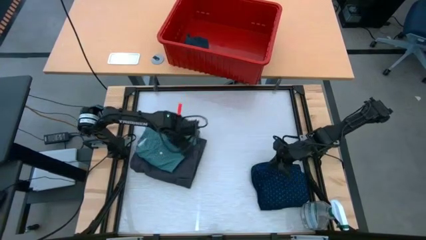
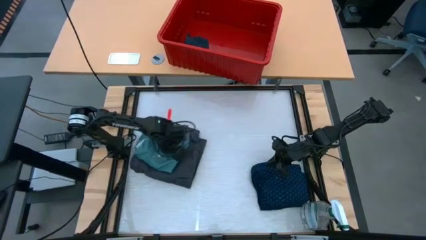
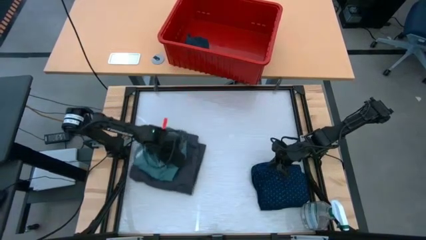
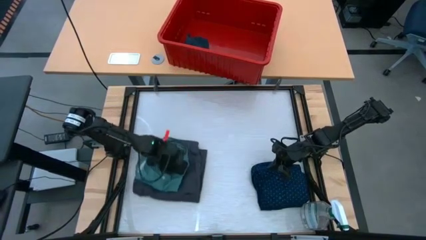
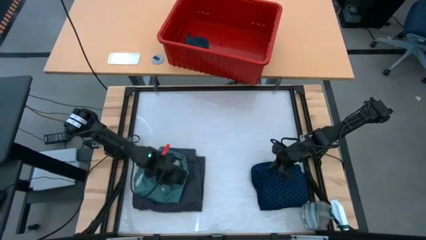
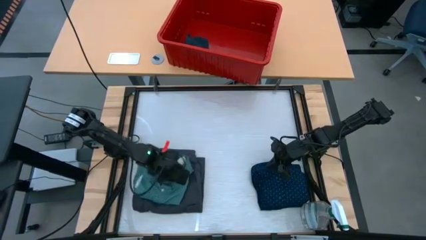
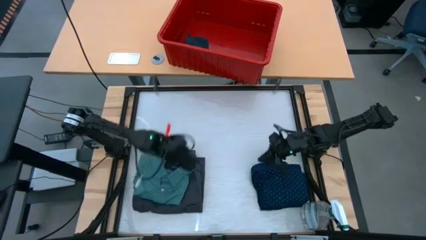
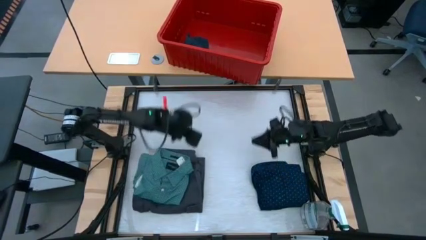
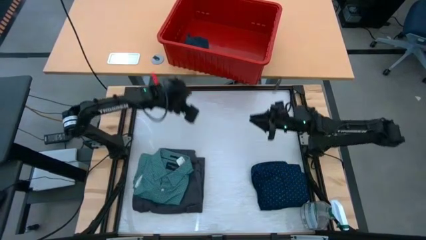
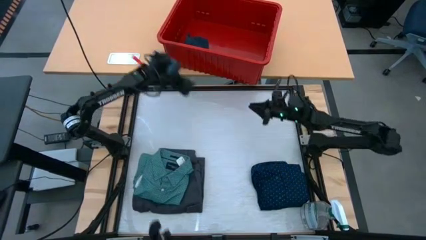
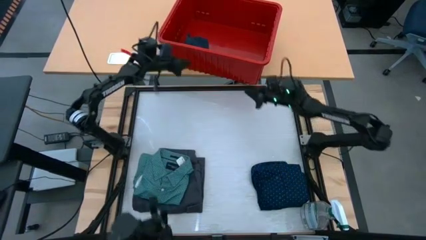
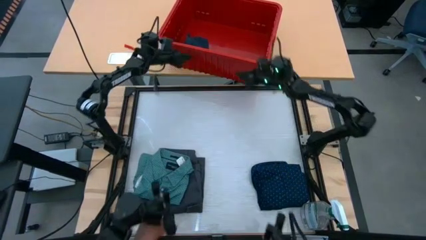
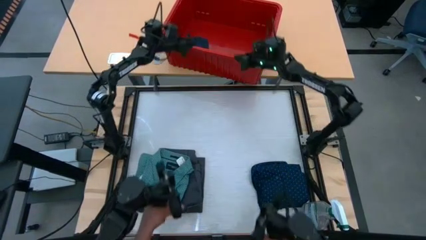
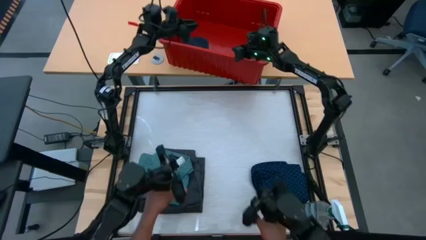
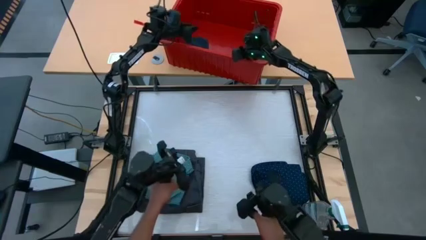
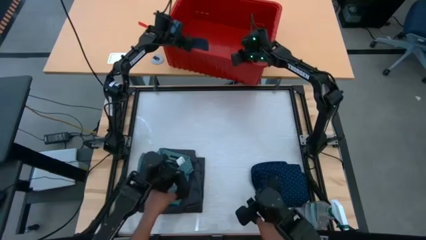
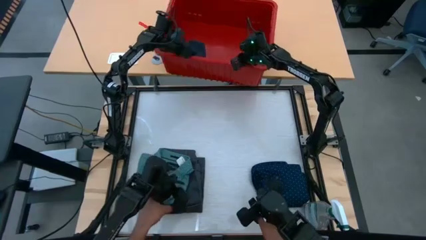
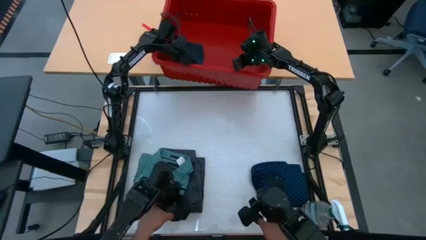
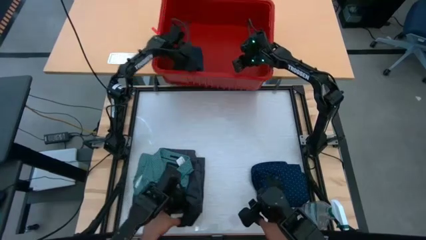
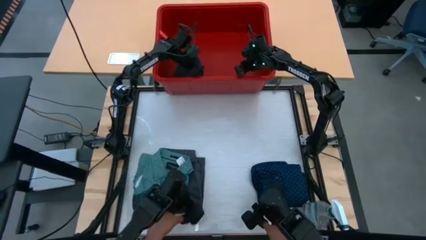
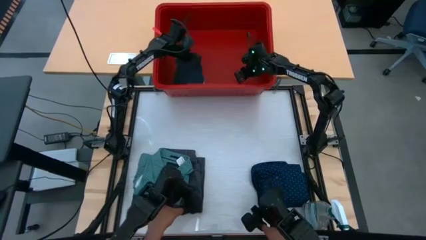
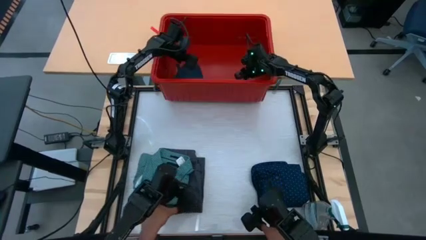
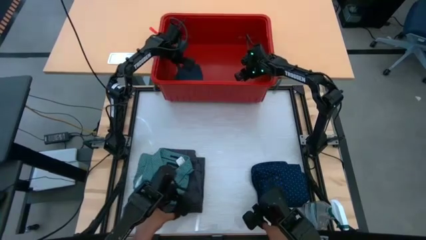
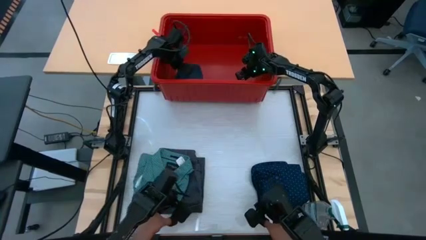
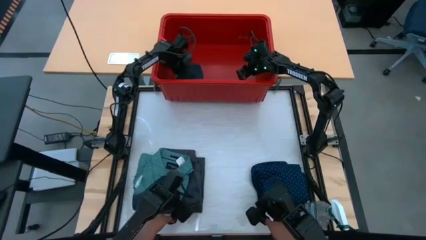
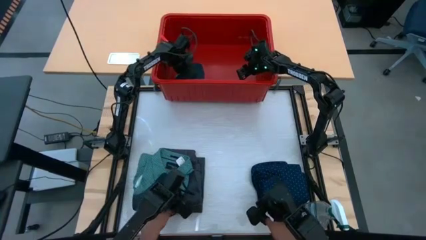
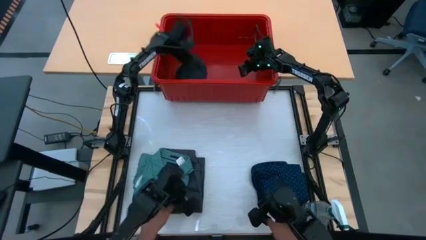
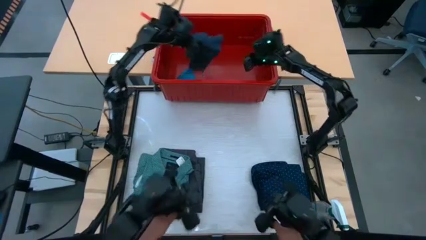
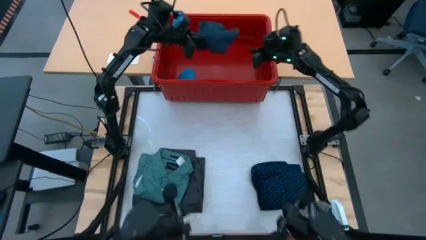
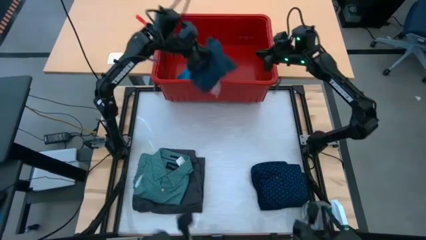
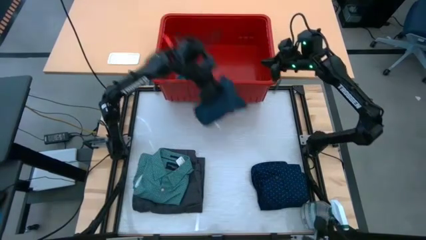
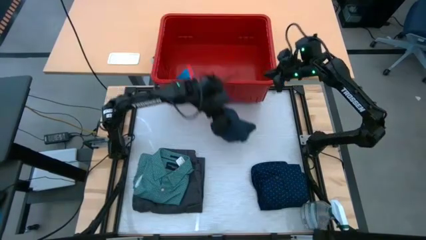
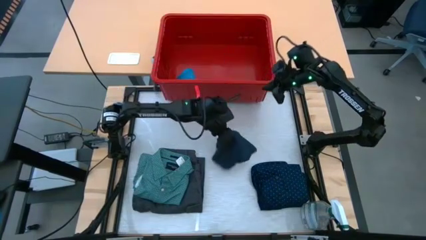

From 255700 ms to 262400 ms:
Task: Fold laundry
Remove the dark blue shorts from the red bin

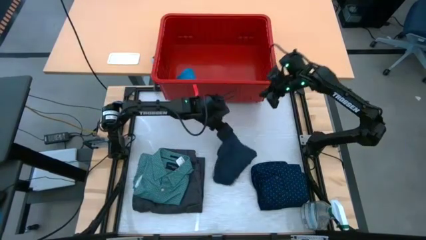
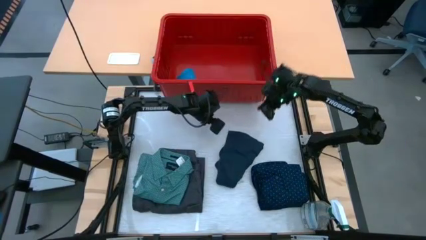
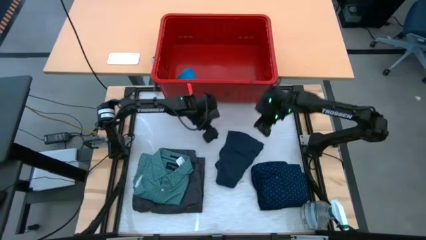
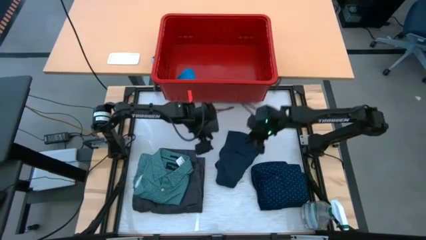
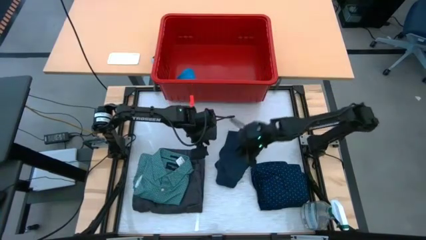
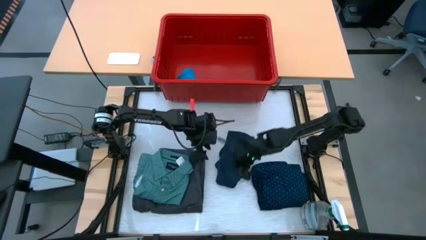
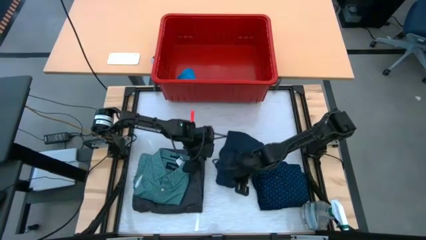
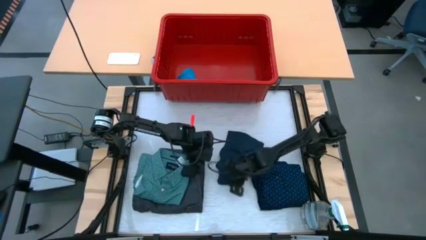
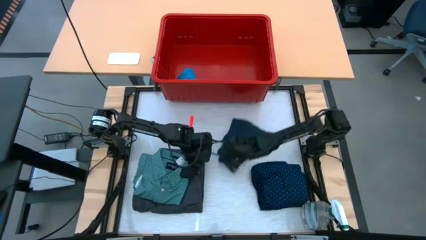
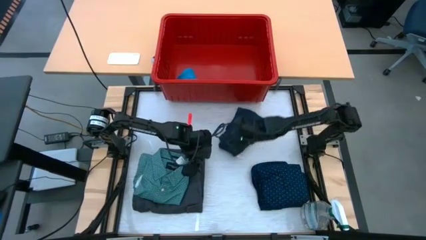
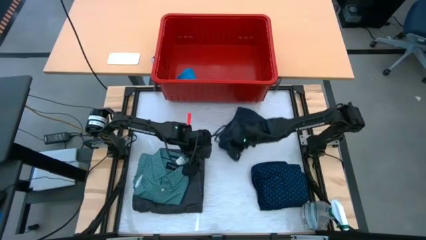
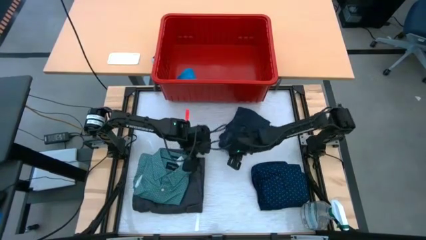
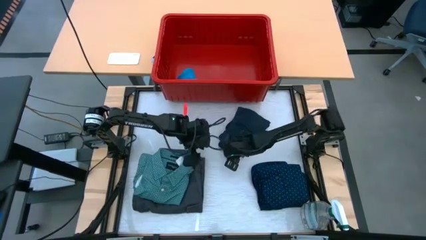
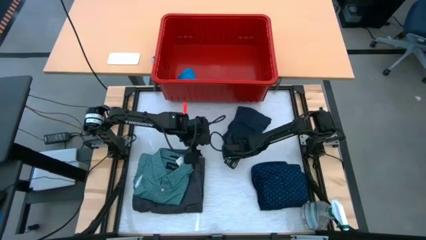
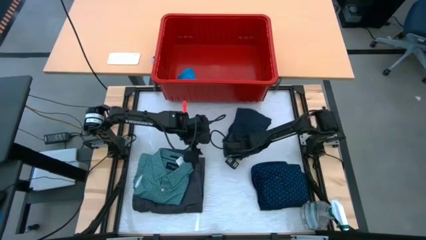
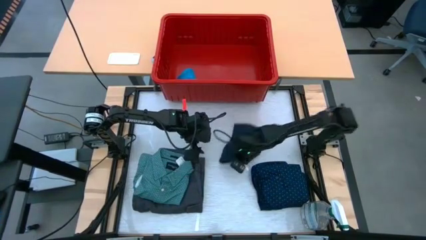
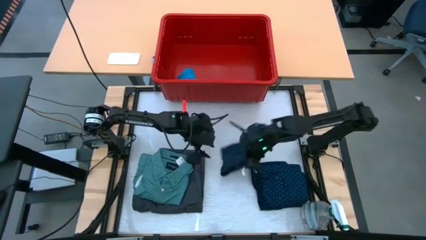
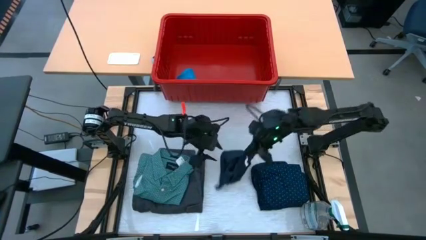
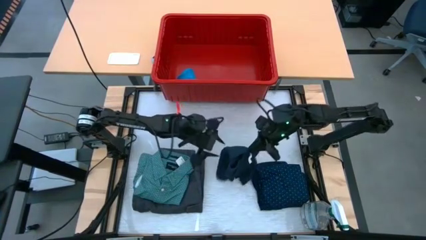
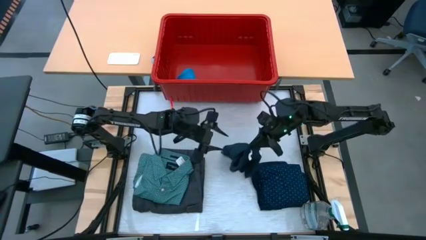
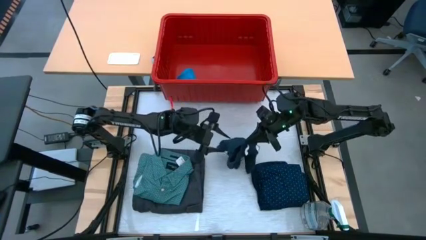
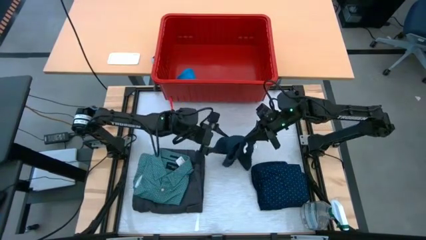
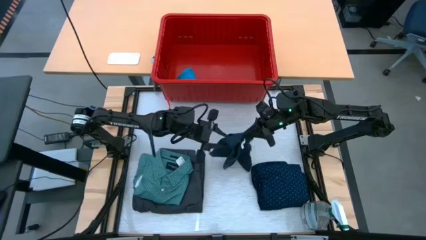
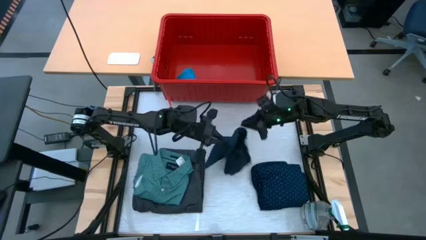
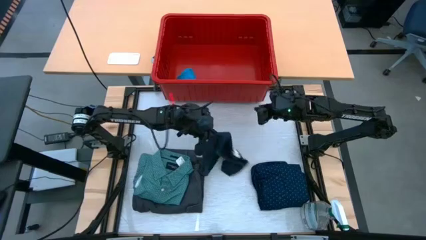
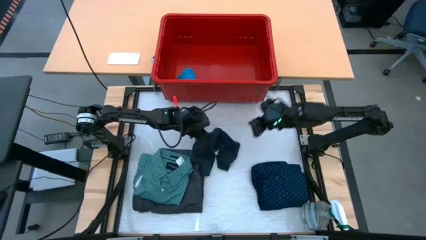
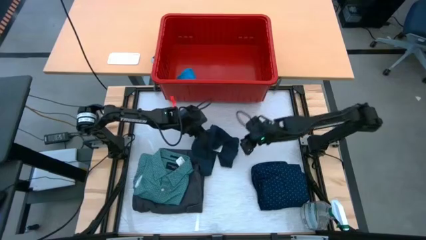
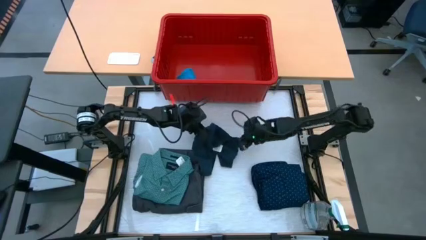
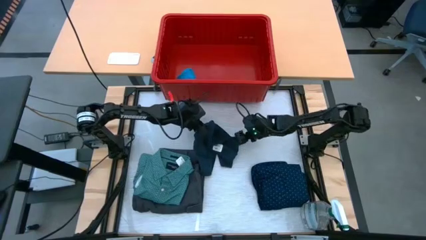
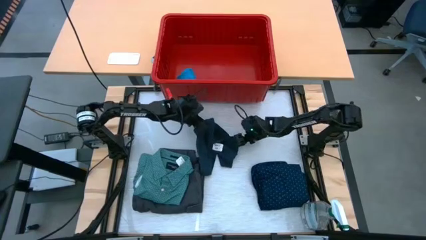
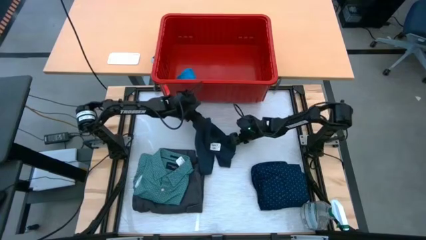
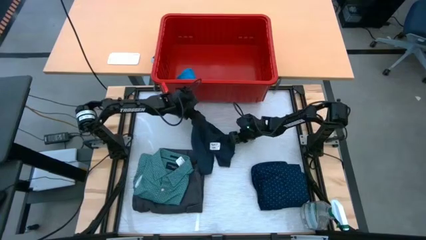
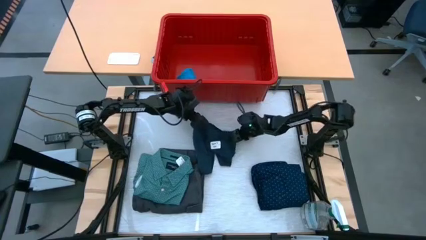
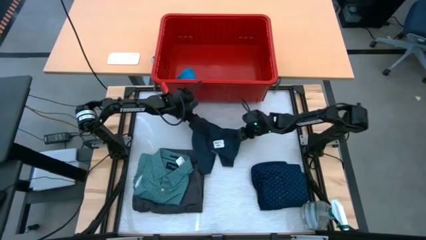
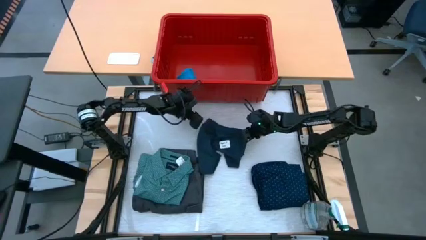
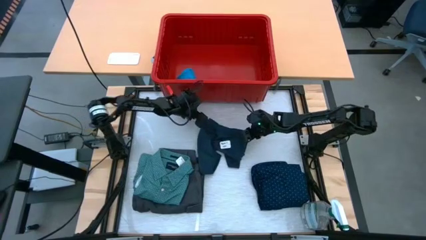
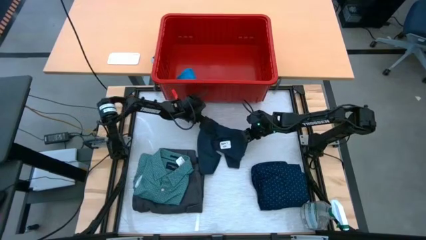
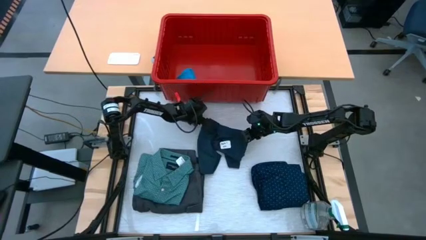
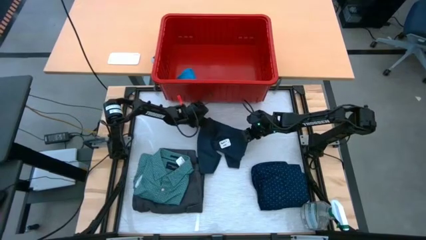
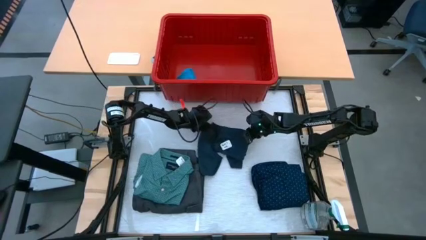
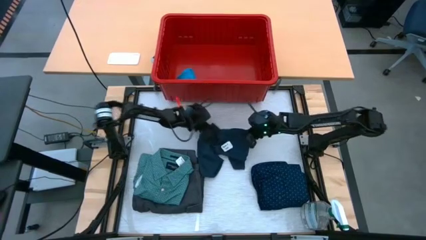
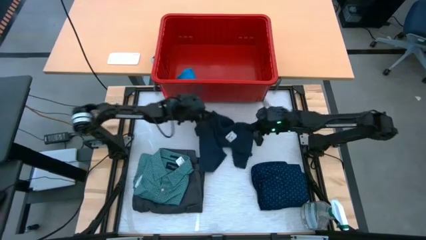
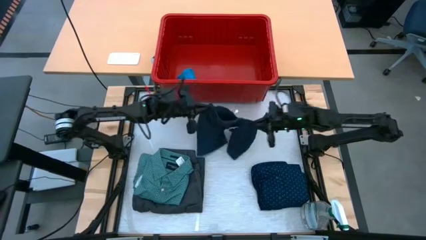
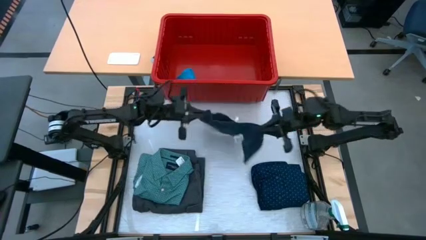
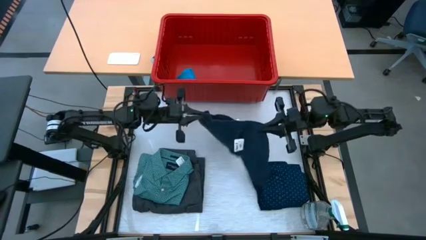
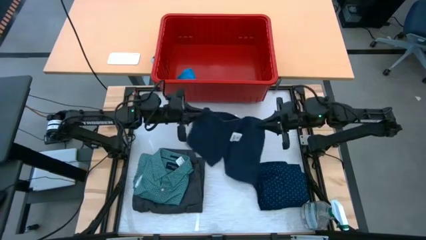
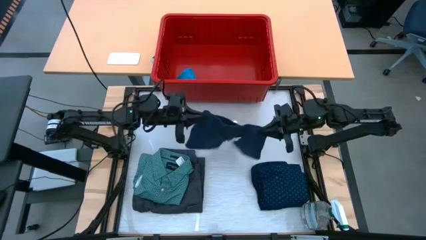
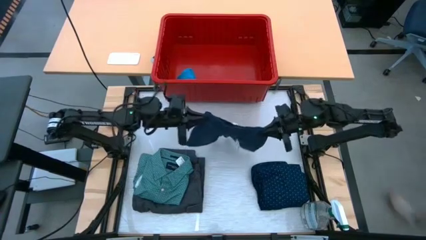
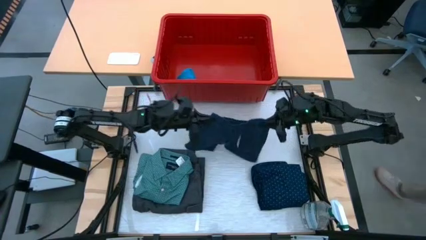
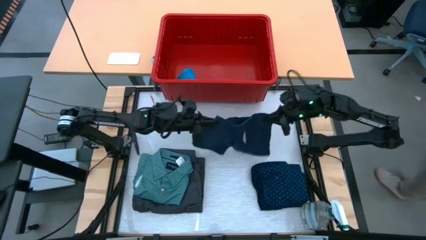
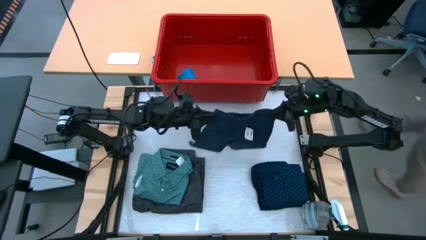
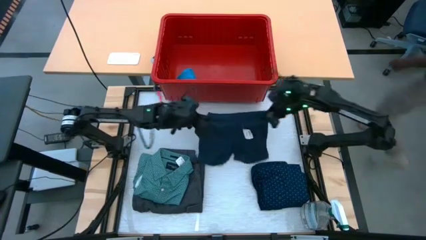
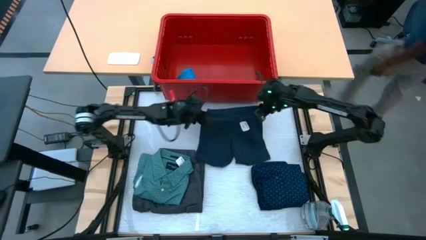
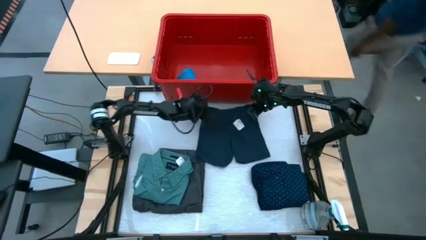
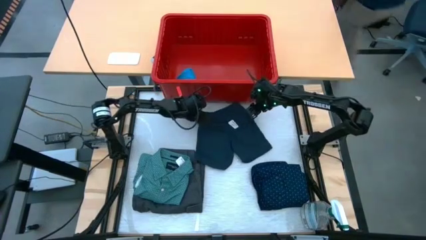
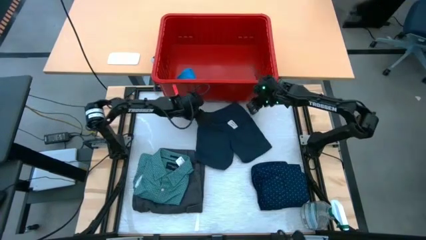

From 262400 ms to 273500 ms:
Fold the dark blue shorts
